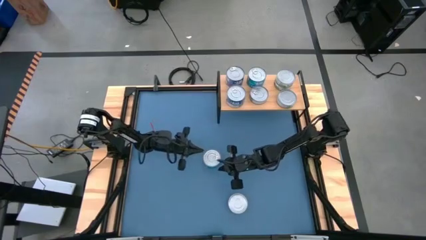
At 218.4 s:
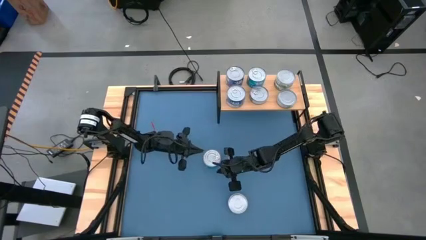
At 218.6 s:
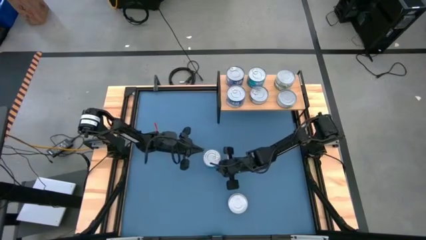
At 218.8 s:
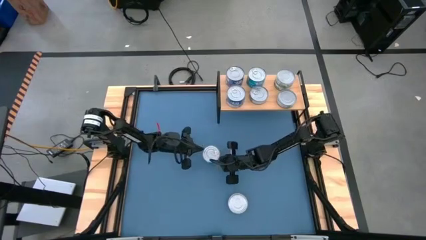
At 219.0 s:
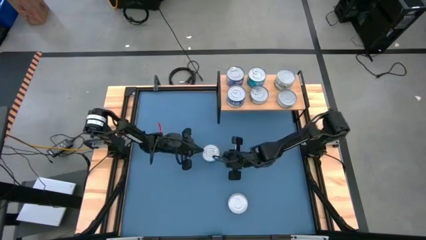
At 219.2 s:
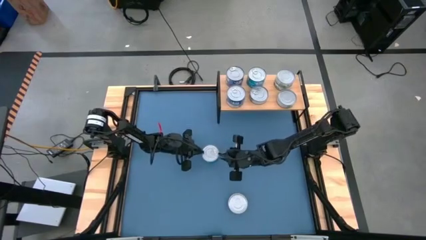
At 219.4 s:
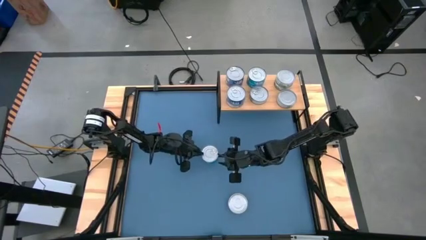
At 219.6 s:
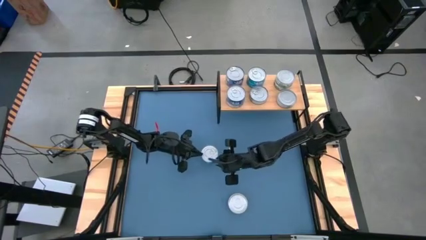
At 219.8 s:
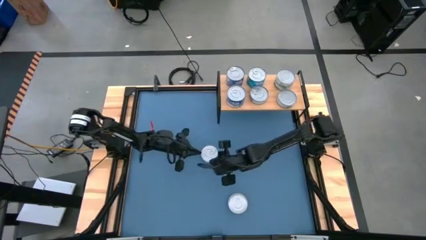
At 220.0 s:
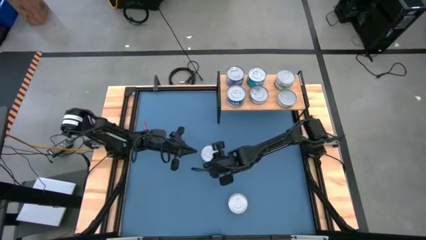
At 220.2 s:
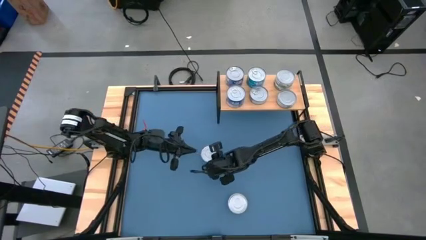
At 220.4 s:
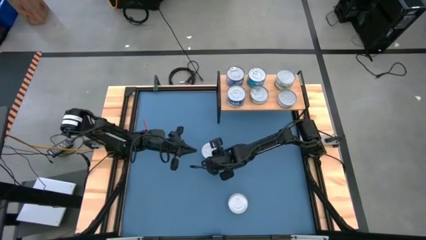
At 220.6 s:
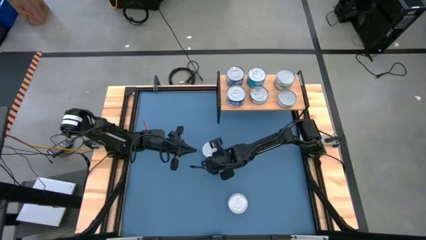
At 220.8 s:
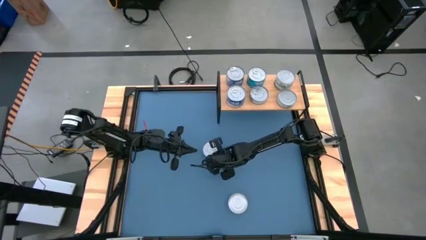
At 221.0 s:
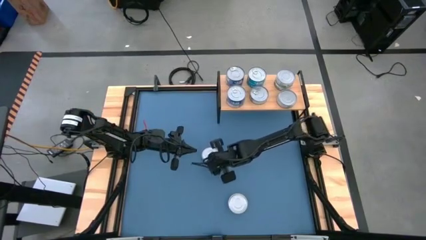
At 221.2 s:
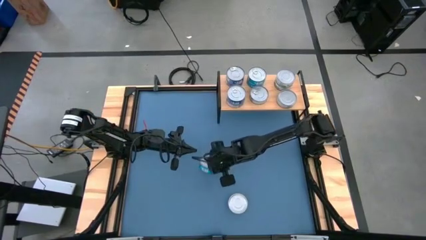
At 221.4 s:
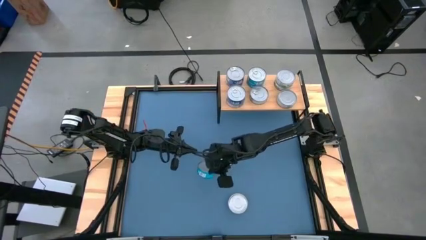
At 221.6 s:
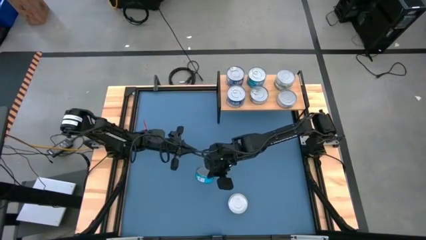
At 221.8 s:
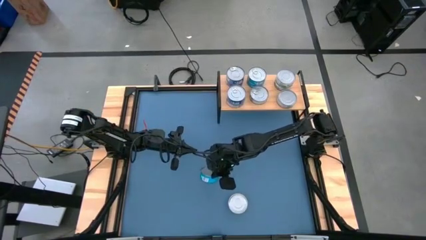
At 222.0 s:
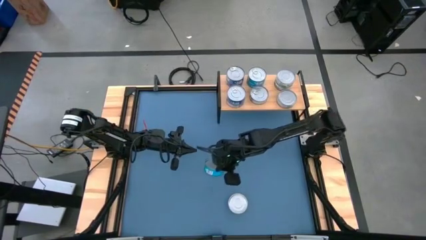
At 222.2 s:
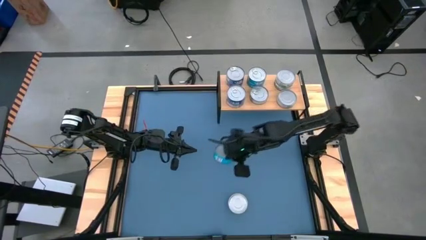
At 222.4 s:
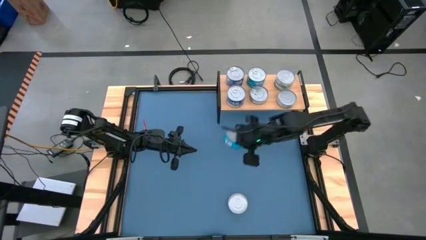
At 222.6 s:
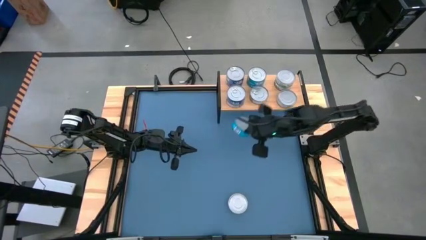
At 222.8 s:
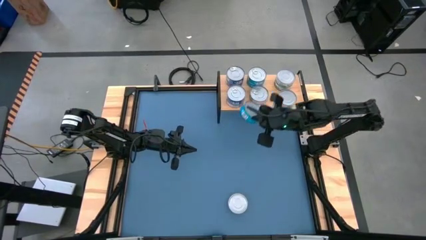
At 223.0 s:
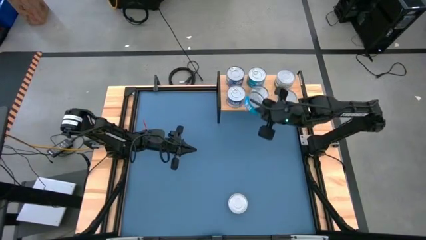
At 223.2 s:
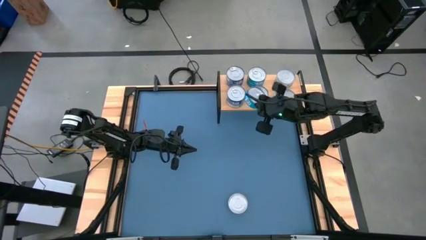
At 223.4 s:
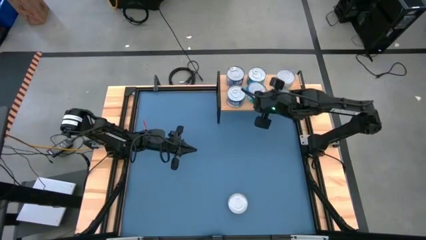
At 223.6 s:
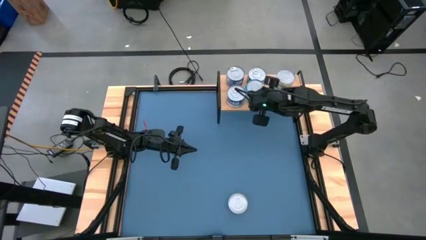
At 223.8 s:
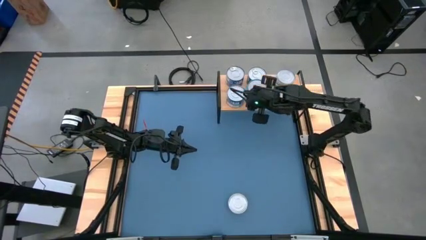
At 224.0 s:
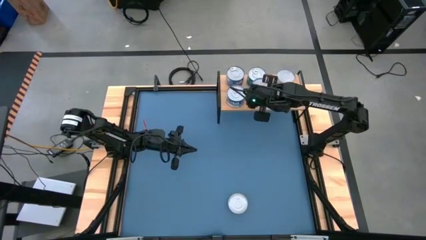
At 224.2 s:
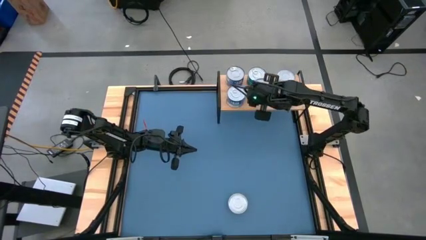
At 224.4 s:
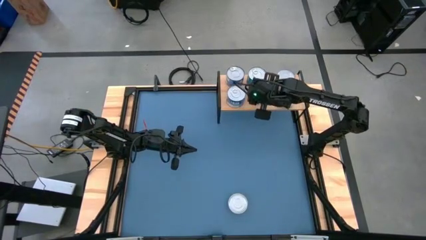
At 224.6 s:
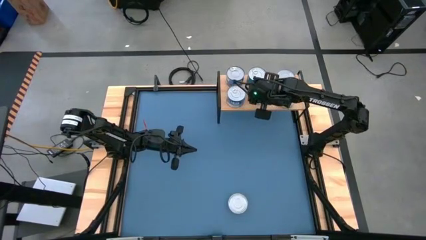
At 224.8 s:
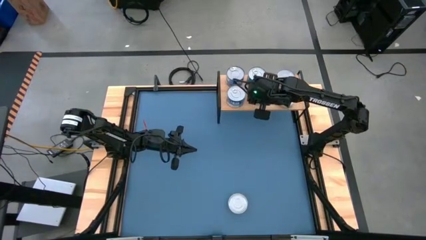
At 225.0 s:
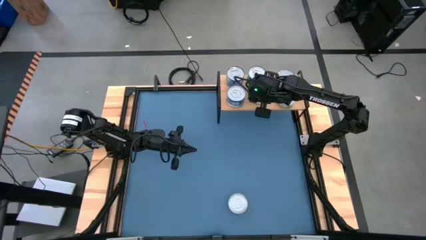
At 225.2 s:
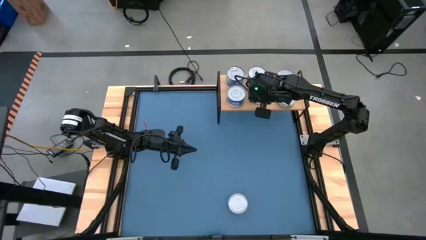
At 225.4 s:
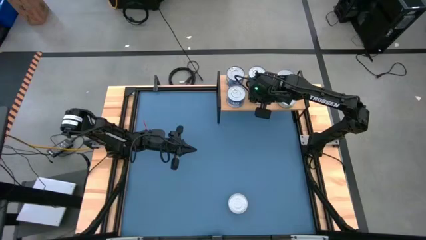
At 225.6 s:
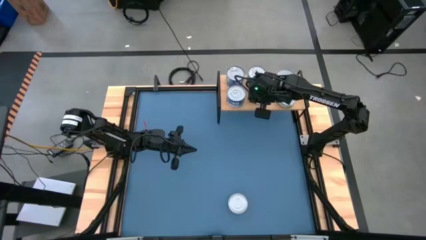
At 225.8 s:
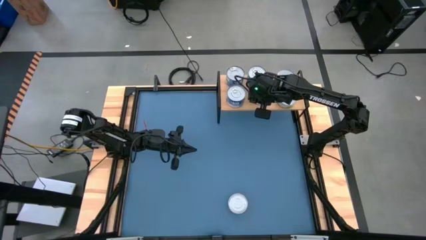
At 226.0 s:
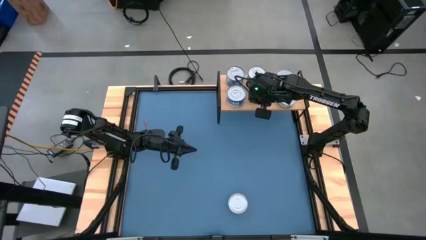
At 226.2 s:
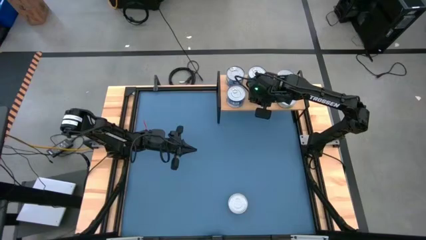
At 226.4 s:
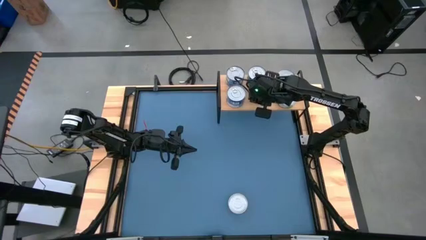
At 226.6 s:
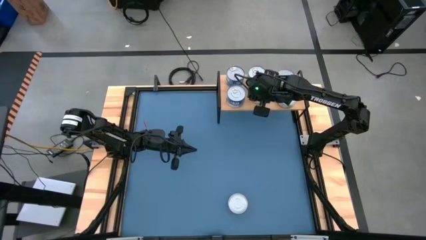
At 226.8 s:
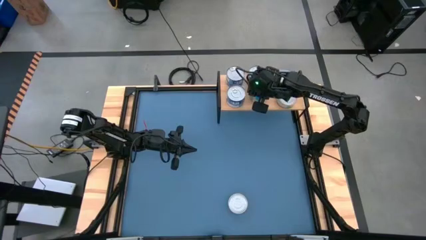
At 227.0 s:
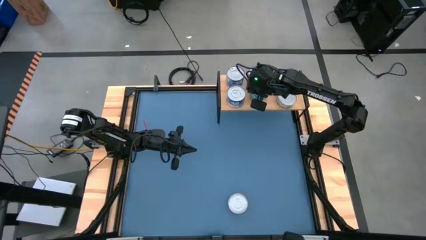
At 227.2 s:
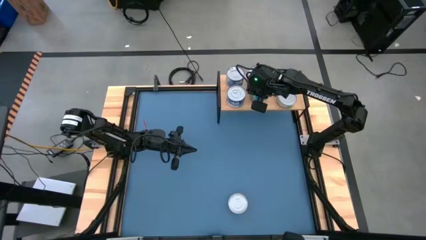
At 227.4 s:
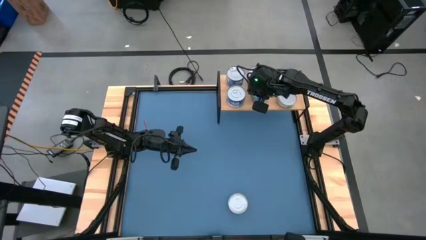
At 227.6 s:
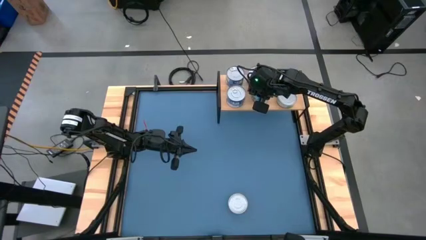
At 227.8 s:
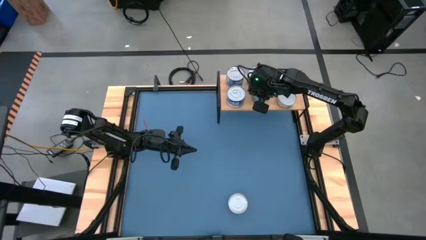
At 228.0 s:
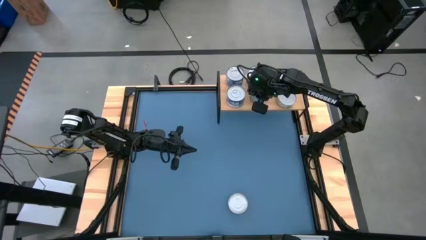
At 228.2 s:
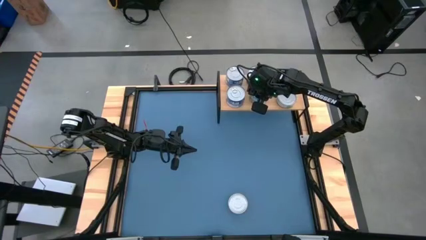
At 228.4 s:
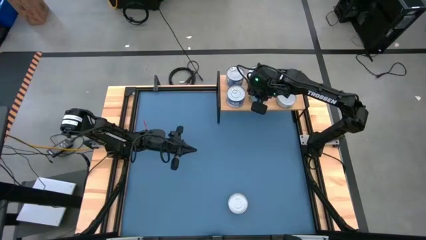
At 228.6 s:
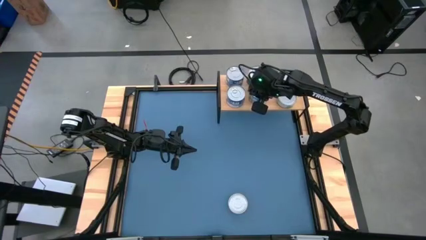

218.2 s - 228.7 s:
Task: Stack canned seafood by type on shelf
Stack the light blue tuna can on top of the light blue tuna can on the shelf

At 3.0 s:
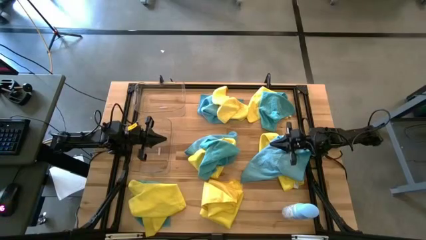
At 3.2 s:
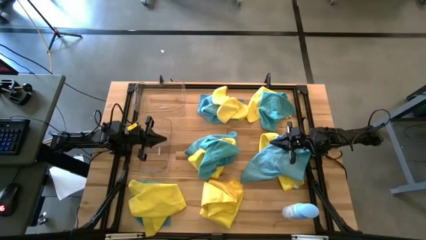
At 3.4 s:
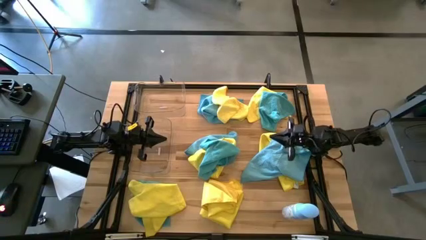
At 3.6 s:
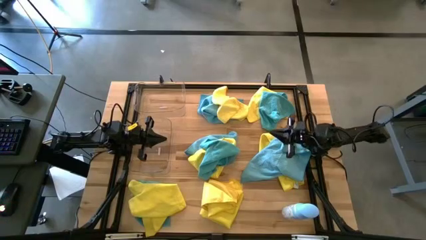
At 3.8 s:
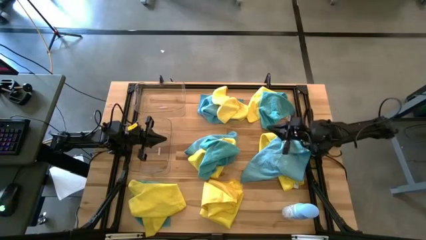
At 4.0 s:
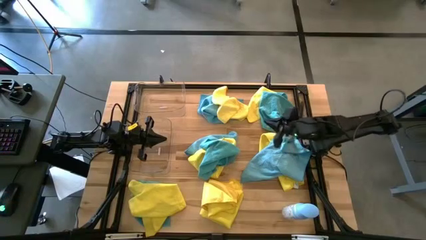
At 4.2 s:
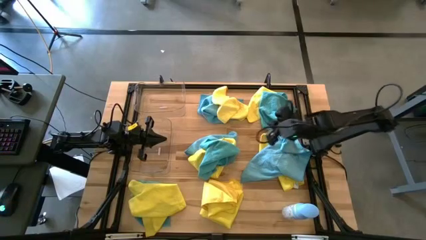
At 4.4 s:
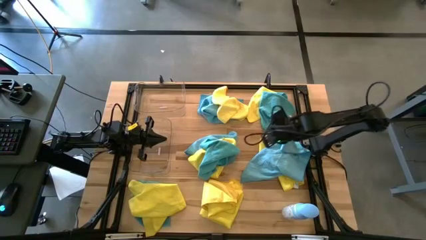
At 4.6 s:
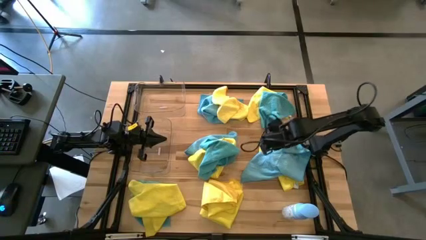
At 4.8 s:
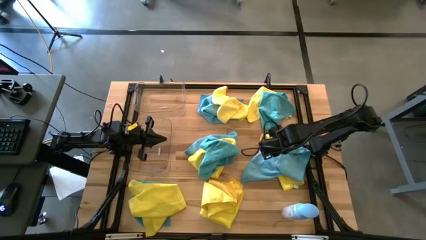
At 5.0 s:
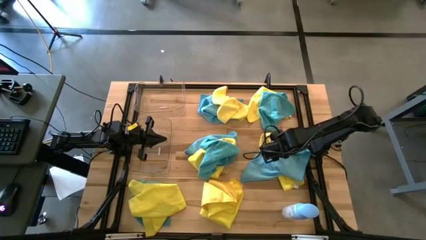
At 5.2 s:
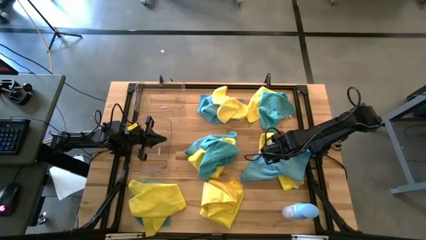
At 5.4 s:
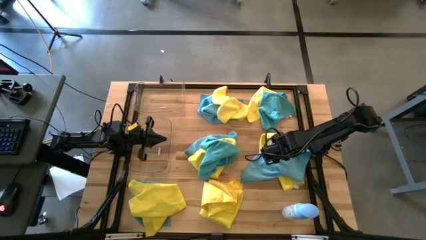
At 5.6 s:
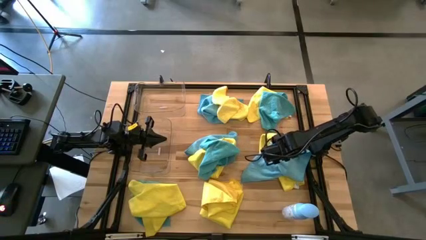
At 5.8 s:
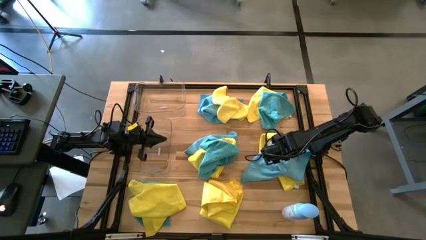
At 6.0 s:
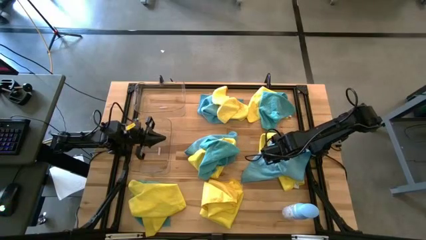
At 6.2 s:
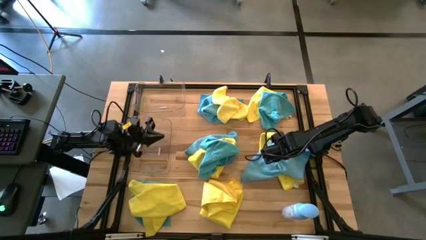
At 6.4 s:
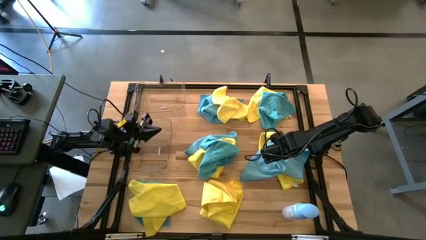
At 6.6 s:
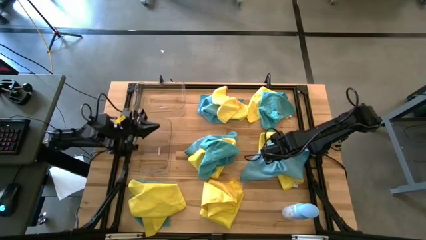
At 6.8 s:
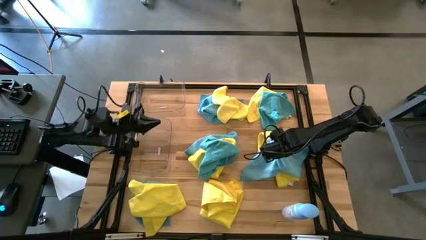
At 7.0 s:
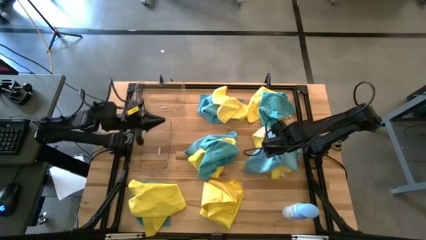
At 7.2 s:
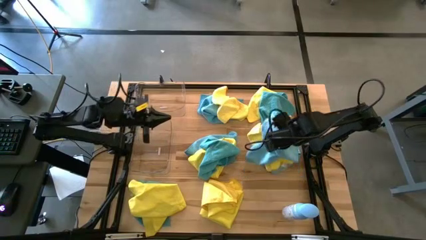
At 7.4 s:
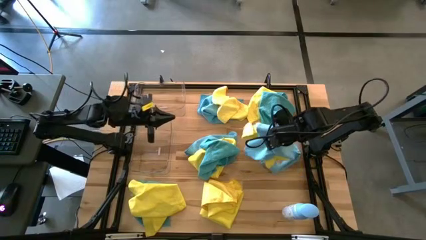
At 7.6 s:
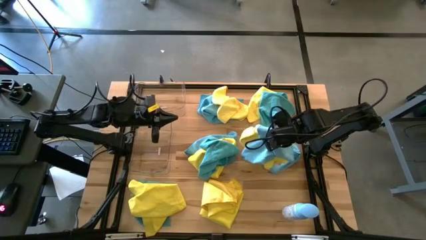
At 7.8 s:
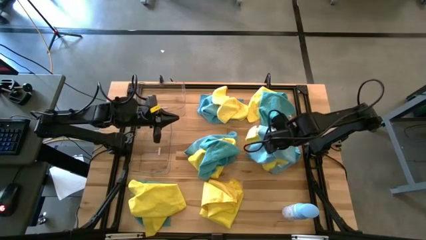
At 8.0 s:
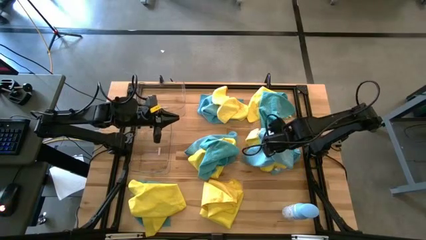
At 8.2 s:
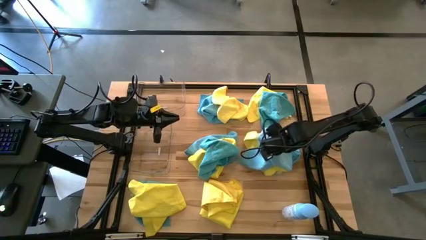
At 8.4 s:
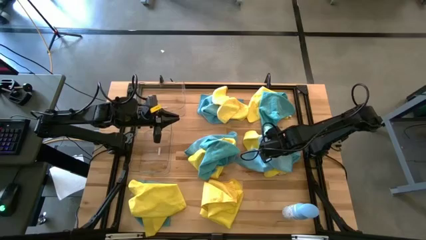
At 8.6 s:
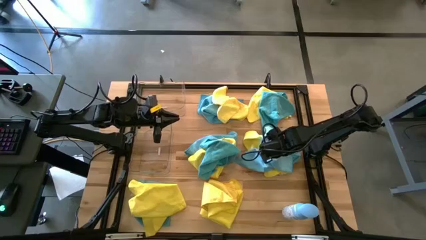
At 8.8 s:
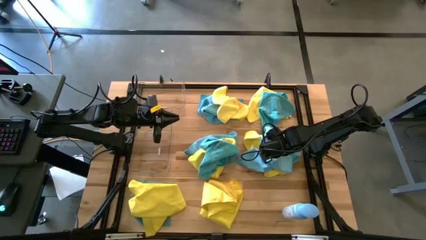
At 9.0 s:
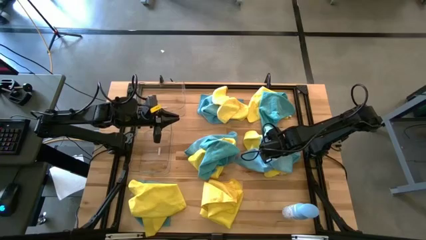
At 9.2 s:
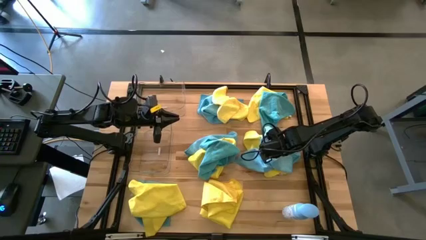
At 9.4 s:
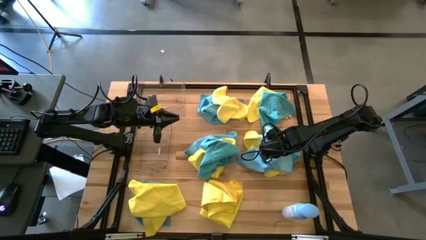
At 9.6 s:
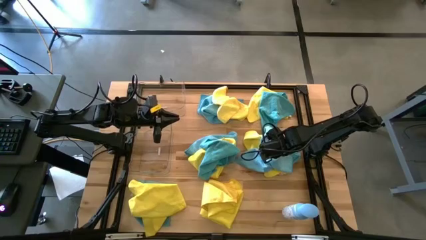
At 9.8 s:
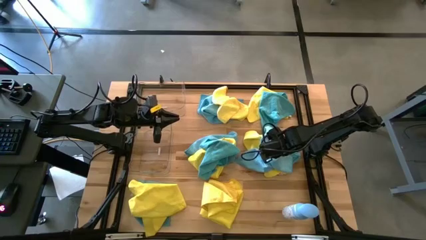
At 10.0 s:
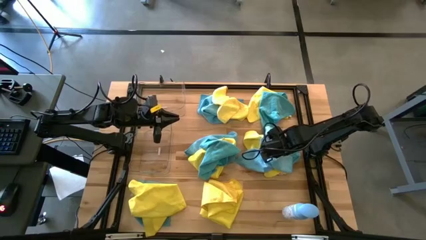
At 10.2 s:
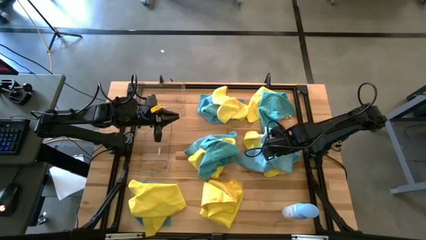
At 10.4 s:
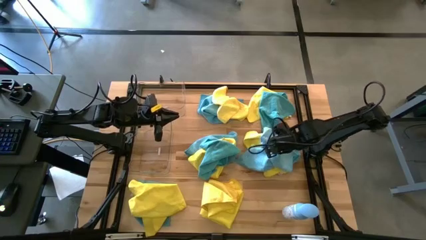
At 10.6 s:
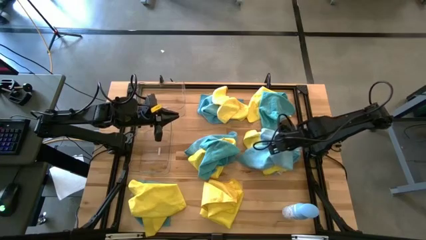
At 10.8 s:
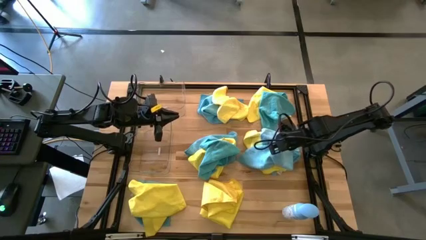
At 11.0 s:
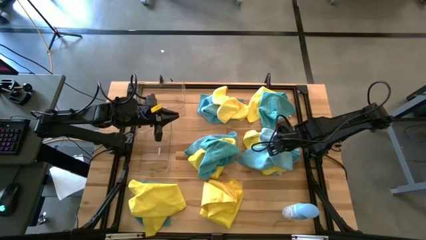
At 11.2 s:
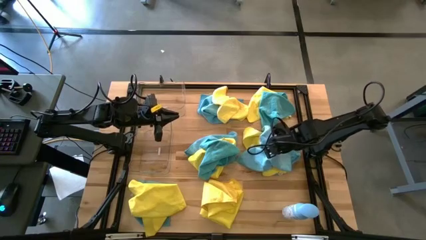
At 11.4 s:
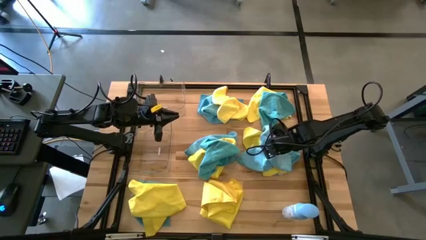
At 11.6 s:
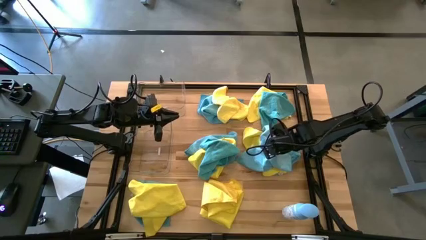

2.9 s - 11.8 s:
Task: Sort microfiber towel by color & place in baskets
Put the blue microfiber cloth into the top transparent bin
